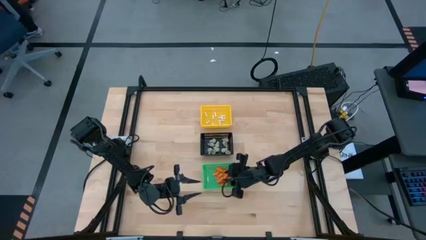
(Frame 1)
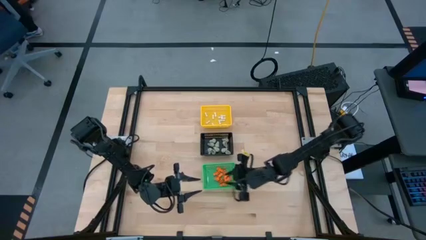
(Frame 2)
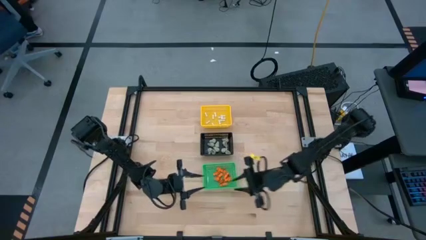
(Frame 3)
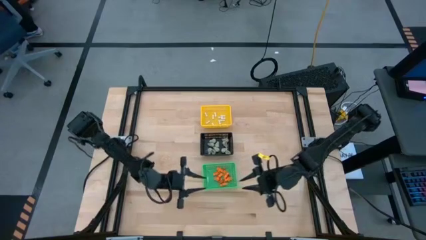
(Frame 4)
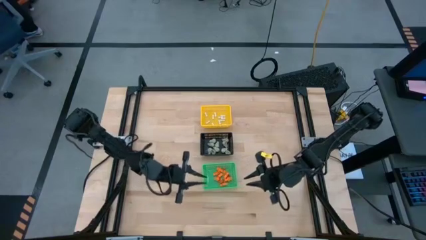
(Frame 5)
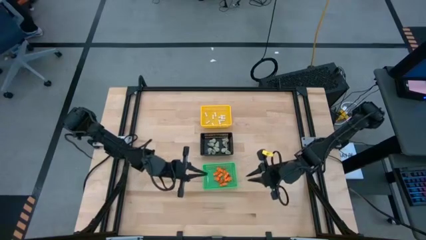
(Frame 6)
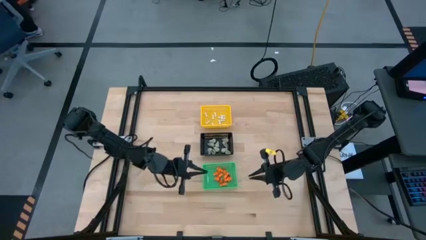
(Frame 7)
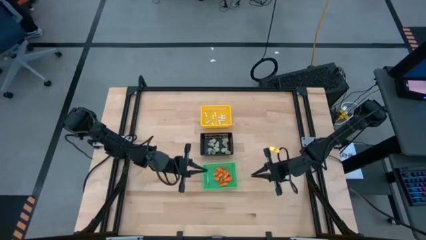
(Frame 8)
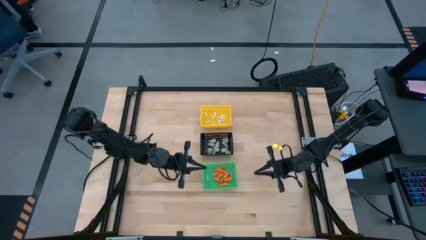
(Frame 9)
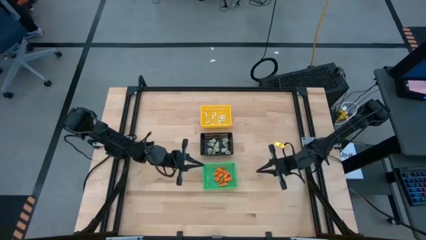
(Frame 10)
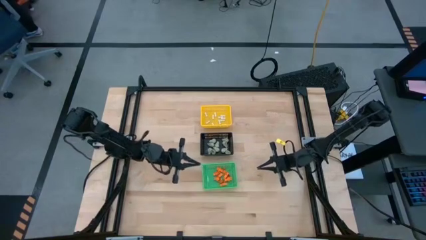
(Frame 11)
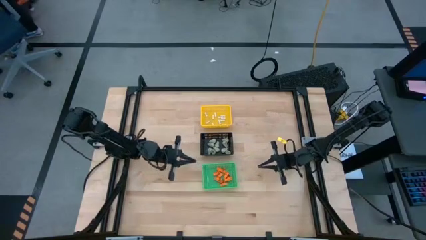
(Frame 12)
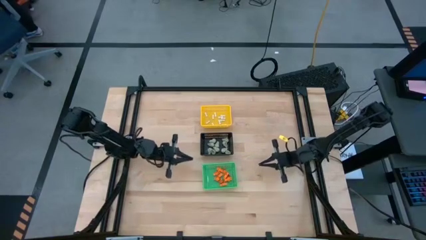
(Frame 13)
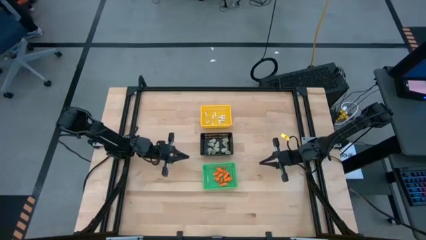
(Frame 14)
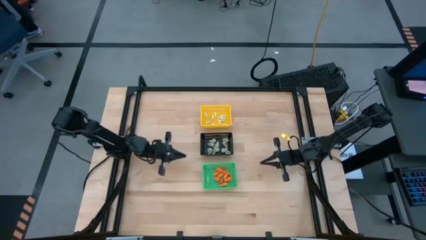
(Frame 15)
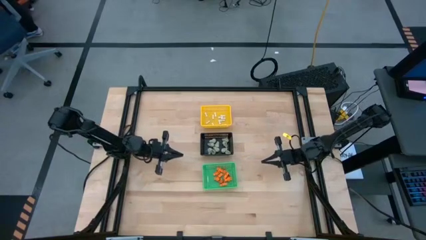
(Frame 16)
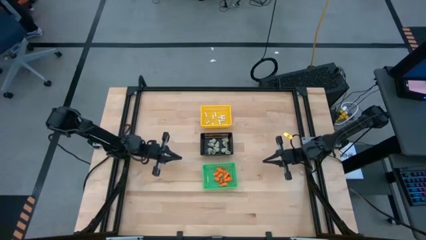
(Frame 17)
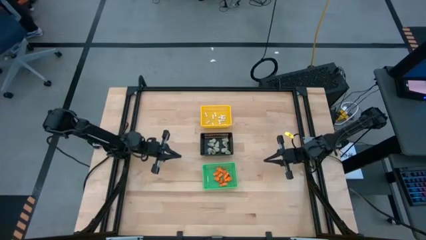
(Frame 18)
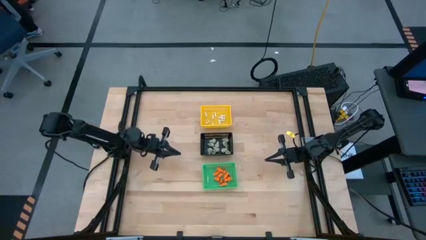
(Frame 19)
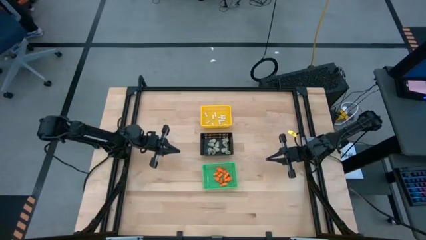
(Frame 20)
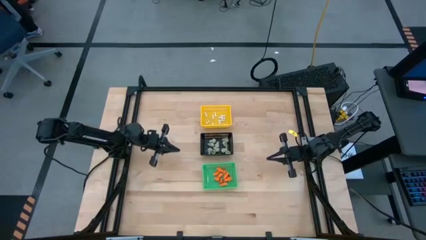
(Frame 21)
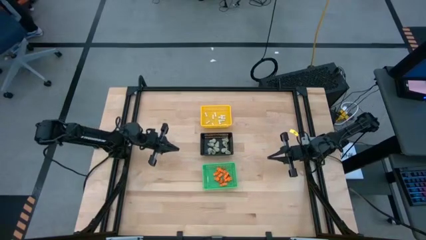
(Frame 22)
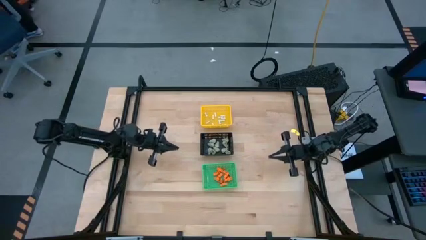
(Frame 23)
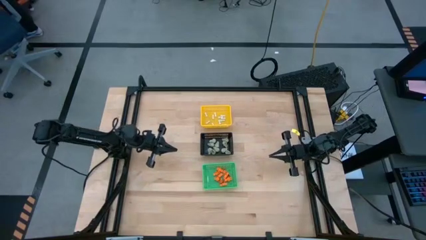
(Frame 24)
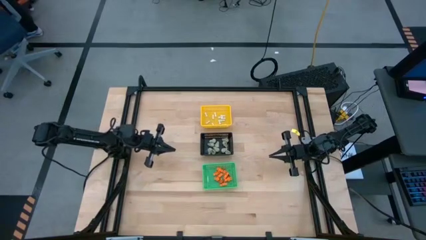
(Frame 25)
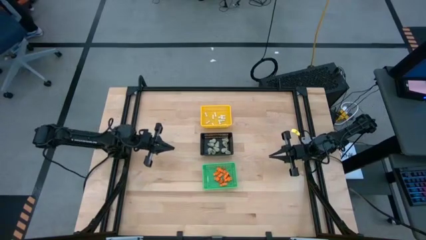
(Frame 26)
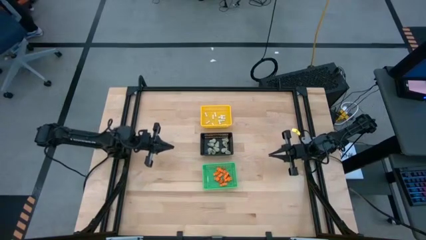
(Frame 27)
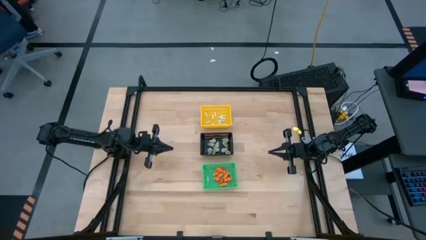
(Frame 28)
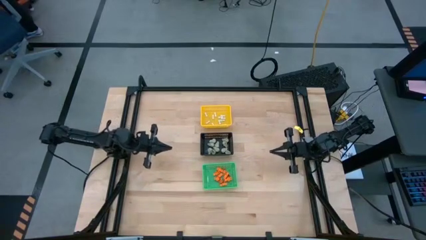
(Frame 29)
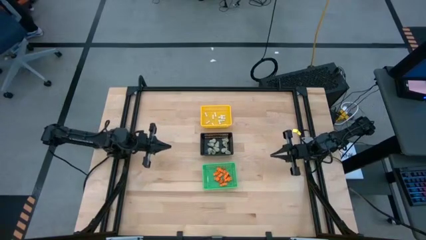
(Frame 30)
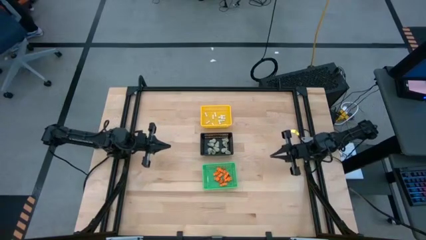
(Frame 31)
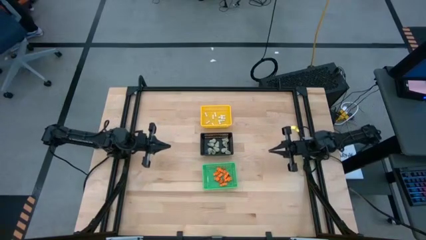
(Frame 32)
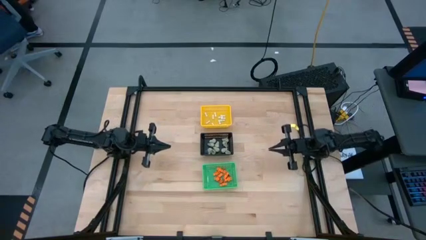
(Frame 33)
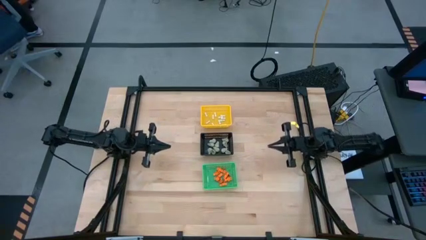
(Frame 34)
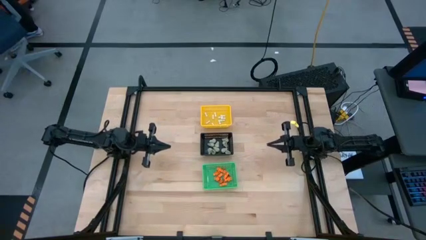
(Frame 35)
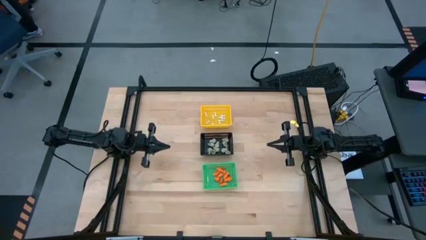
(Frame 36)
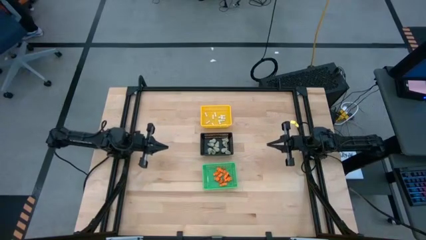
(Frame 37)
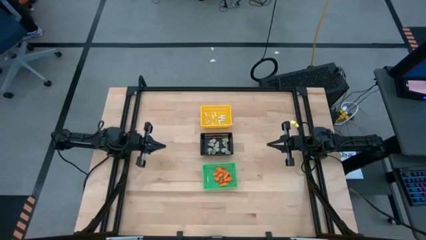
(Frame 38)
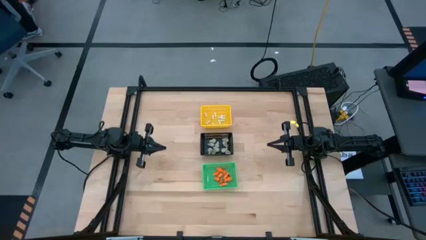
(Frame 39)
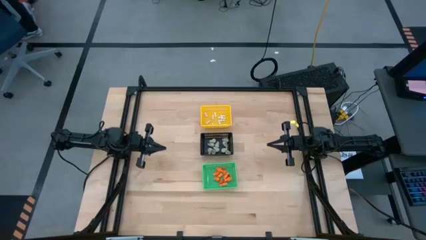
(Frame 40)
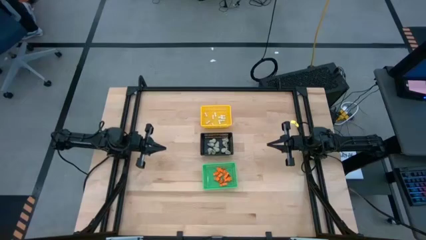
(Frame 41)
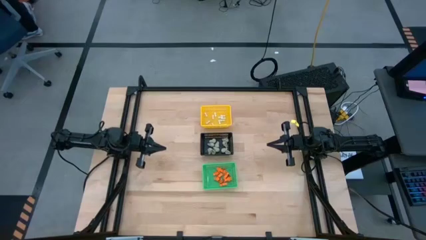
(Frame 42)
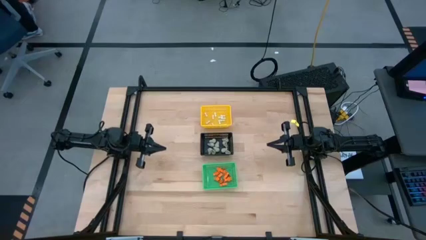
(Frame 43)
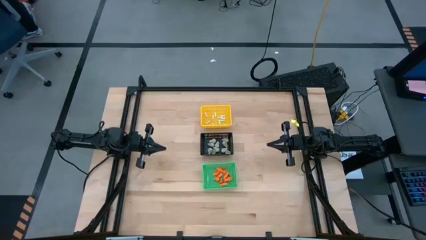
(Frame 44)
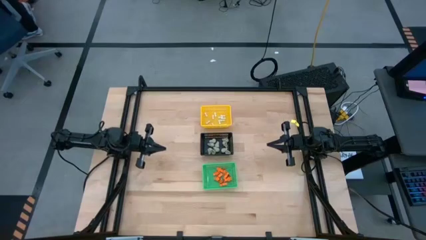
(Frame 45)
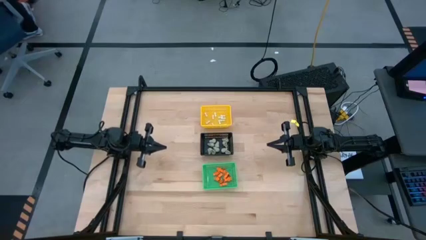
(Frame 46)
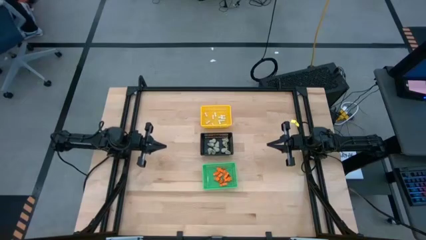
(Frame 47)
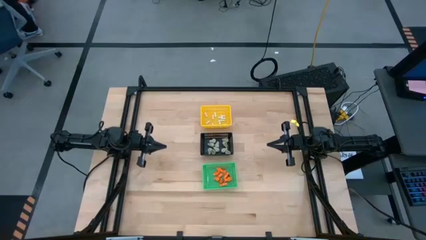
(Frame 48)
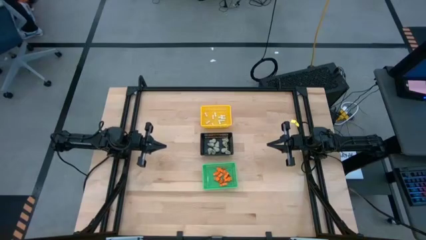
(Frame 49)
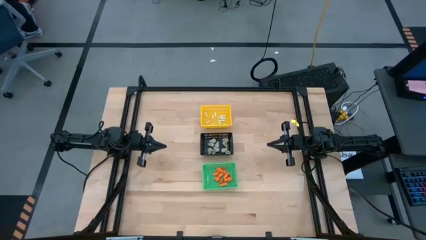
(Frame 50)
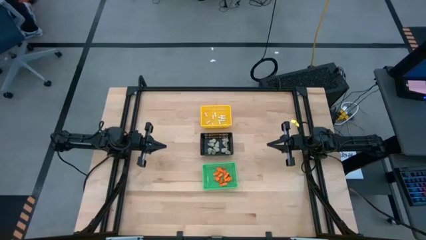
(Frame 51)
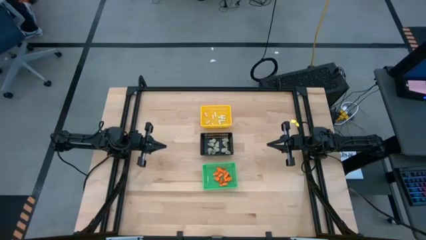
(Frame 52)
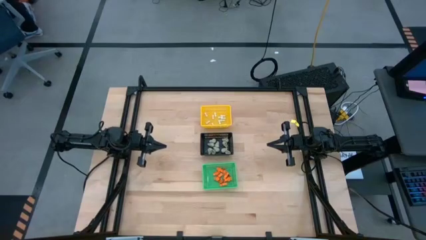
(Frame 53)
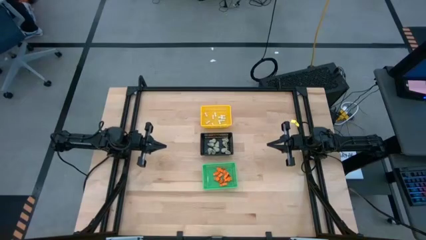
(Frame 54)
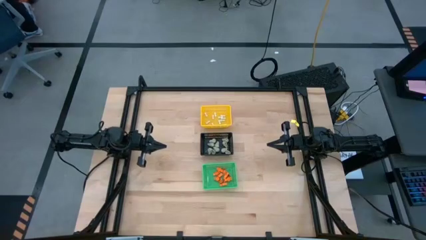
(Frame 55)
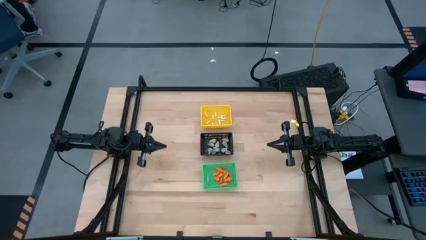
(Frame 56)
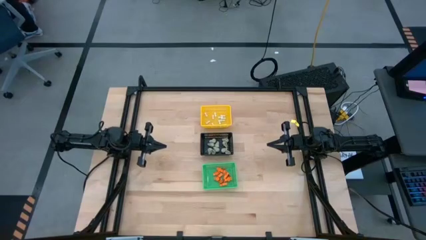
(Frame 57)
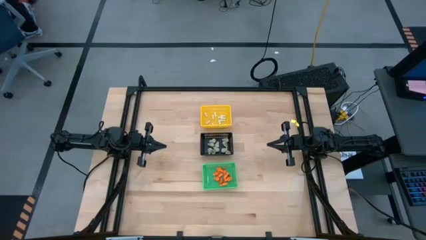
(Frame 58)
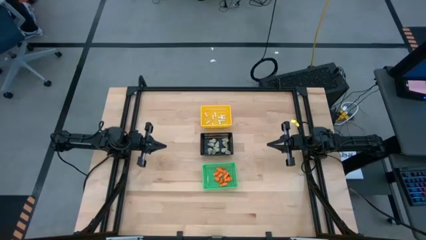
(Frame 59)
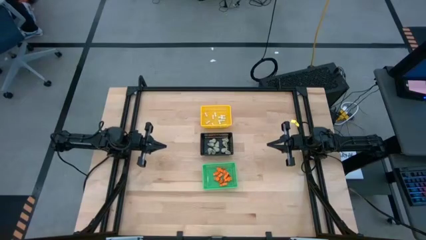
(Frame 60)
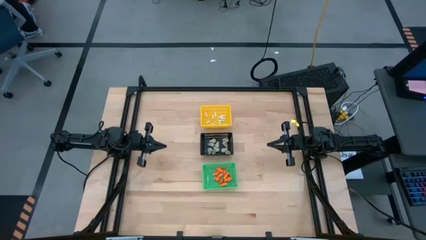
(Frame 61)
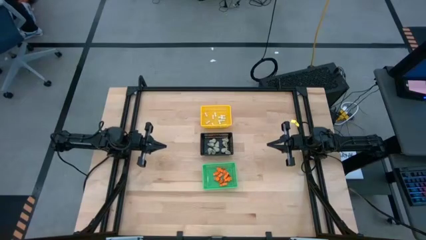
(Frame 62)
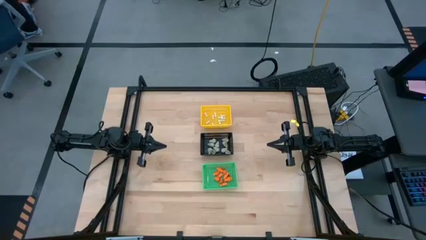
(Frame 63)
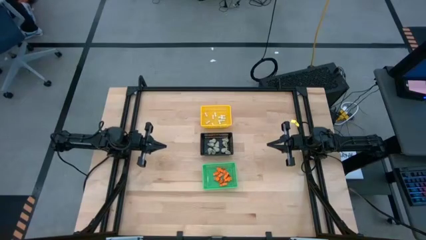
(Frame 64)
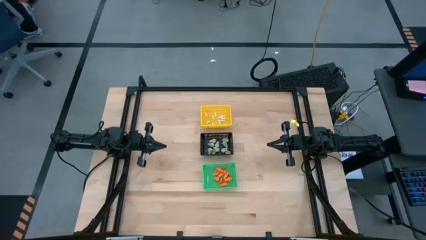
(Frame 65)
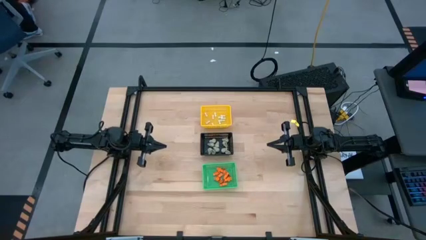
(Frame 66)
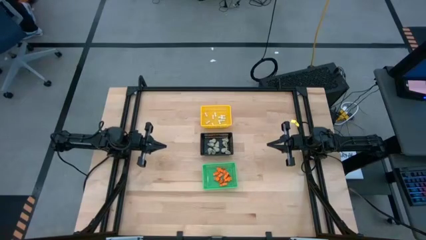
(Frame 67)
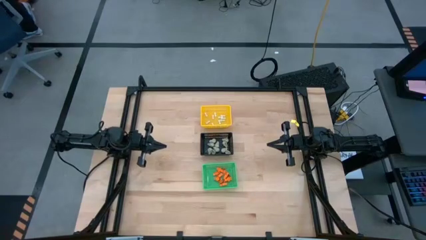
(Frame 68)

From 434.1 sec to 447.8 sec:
Task: Sort Halloween decoration
Return to Home Position
